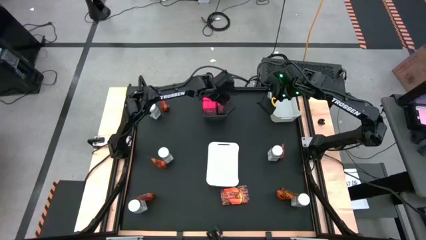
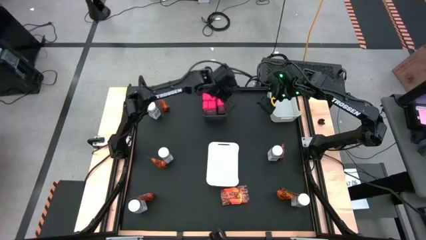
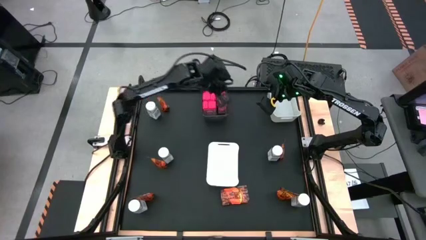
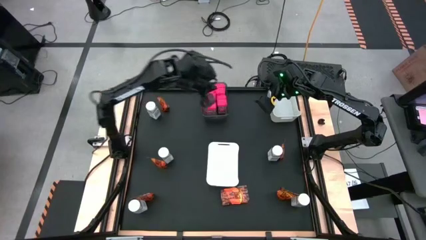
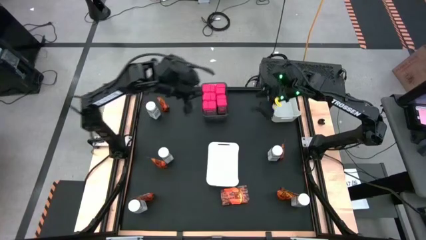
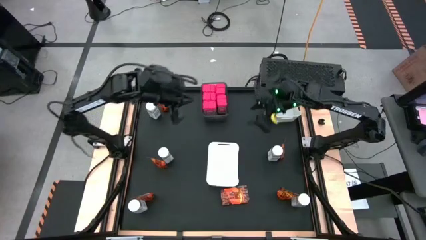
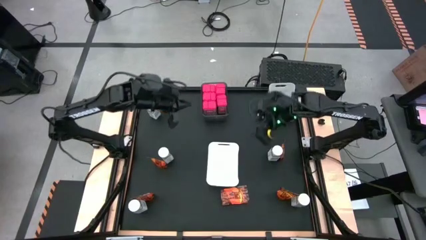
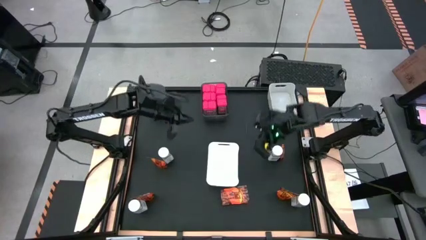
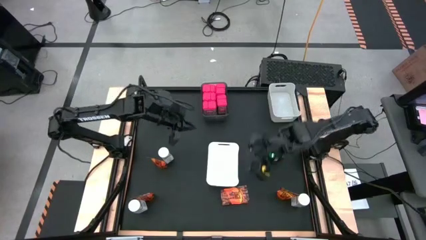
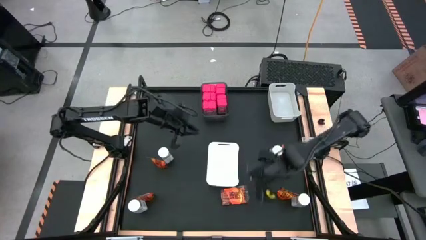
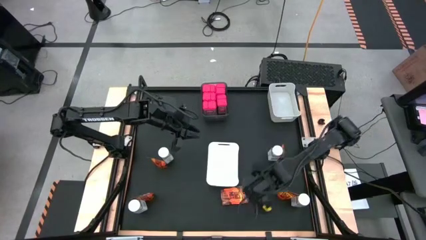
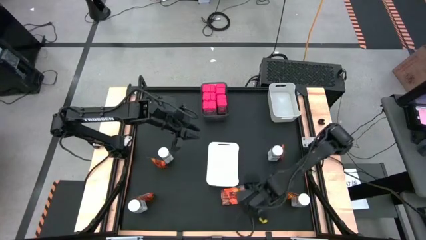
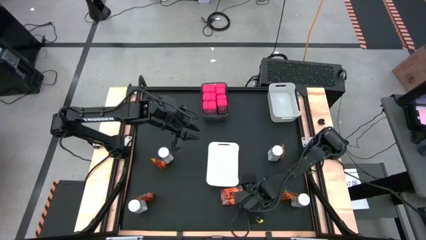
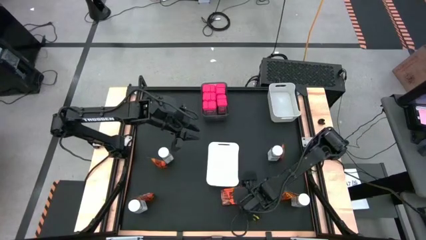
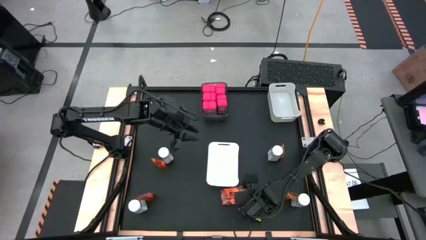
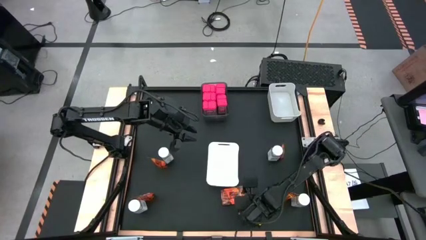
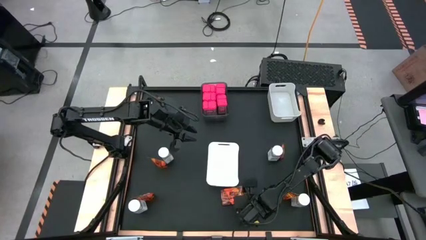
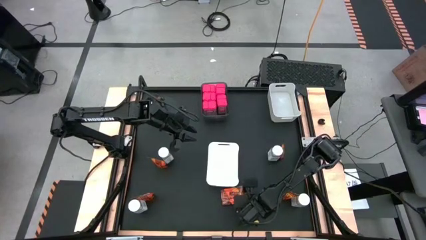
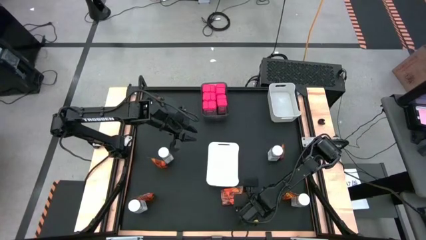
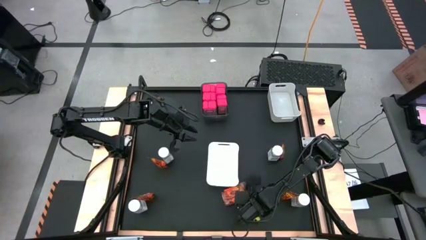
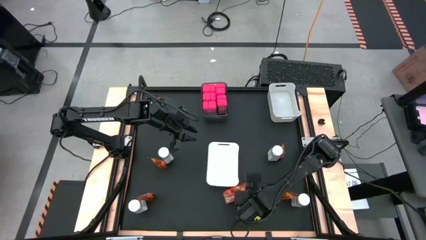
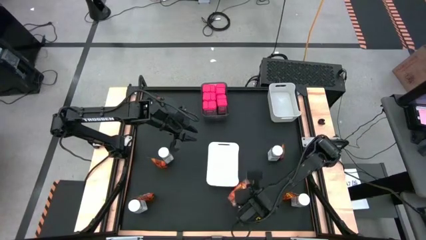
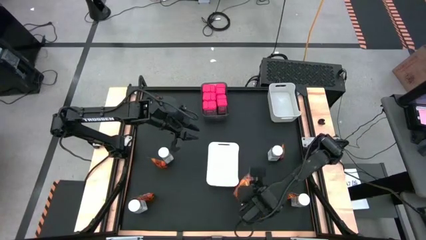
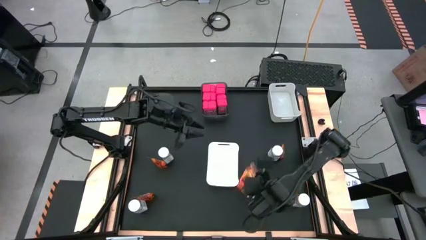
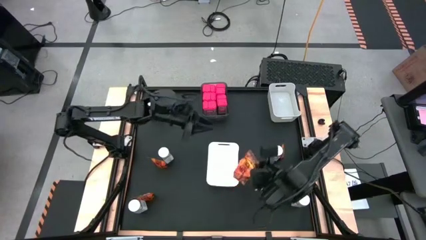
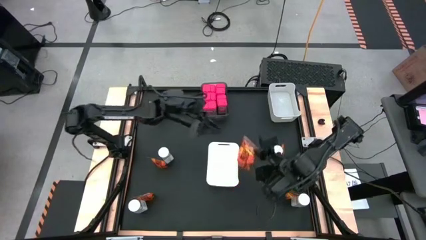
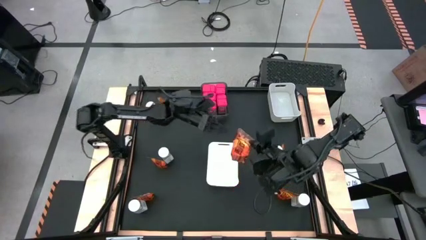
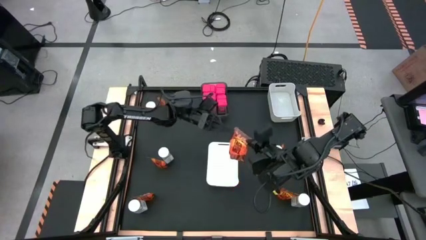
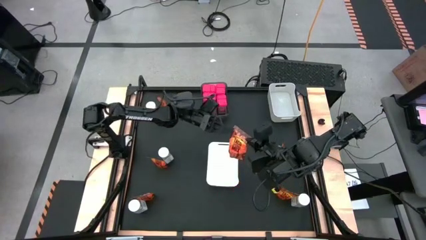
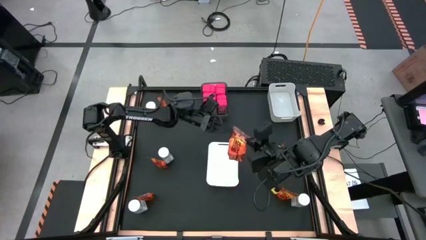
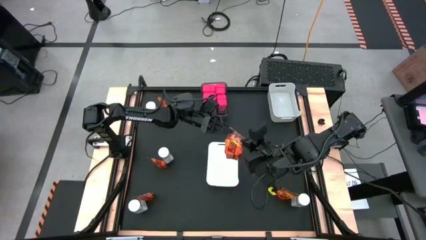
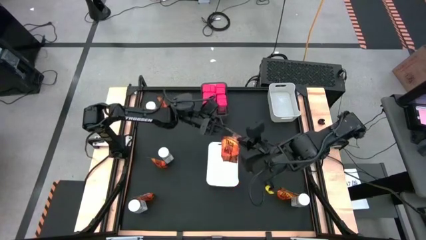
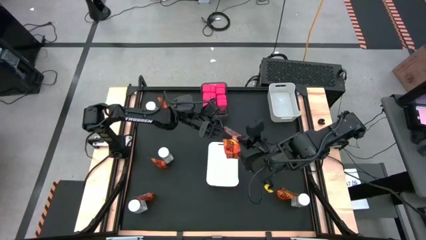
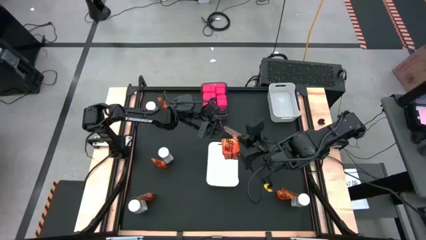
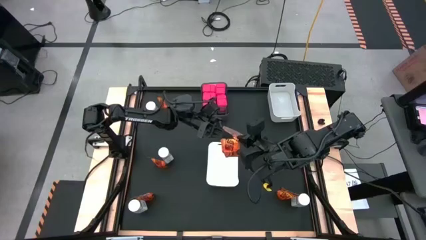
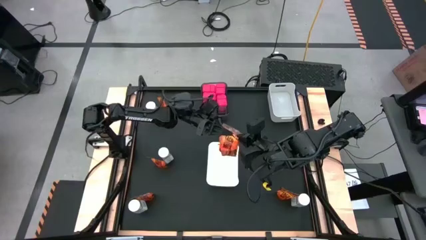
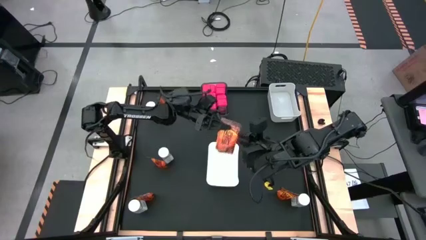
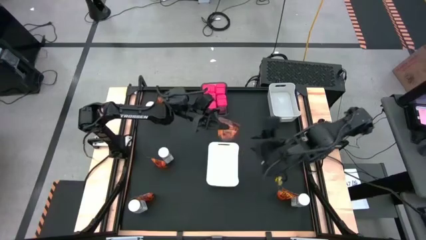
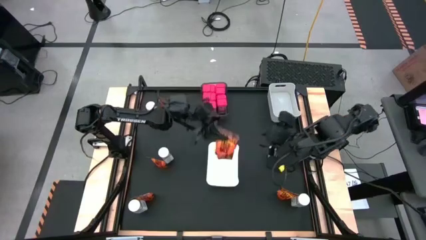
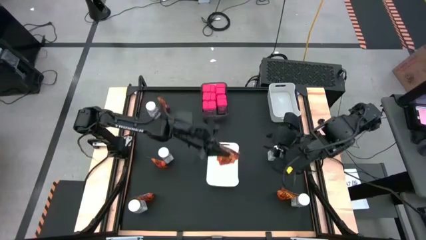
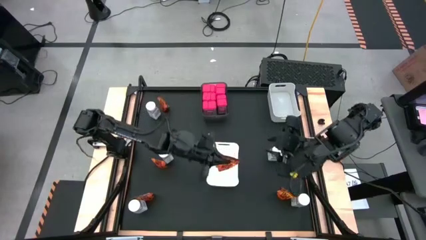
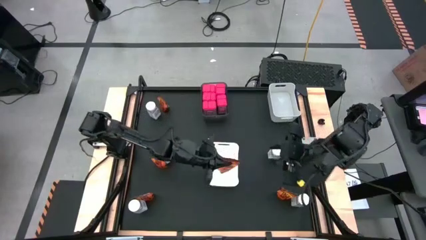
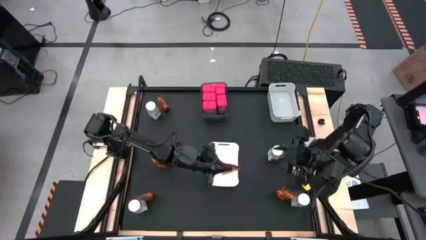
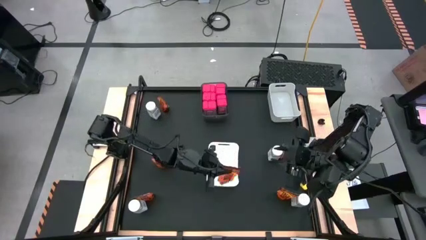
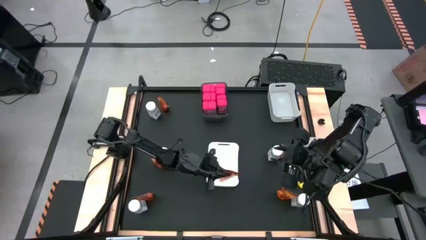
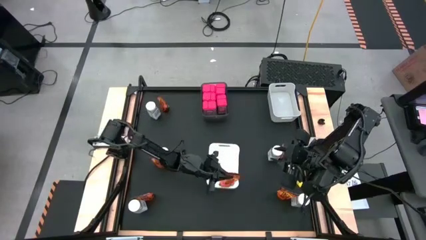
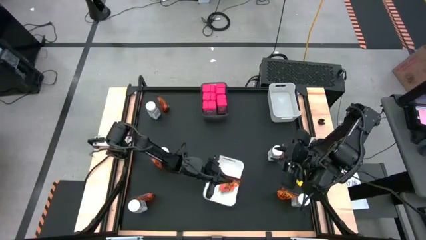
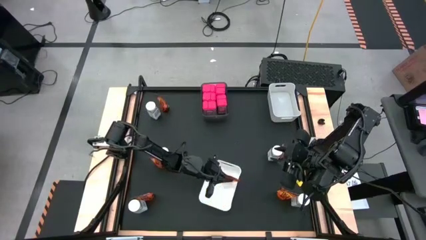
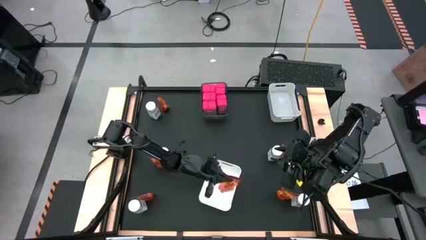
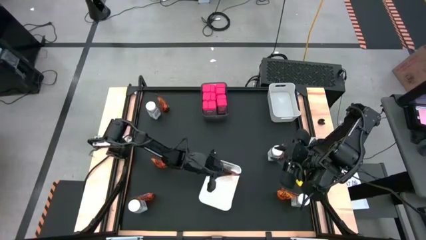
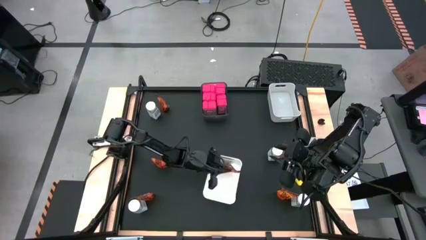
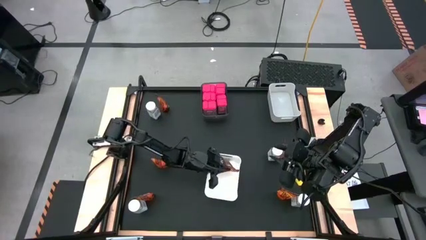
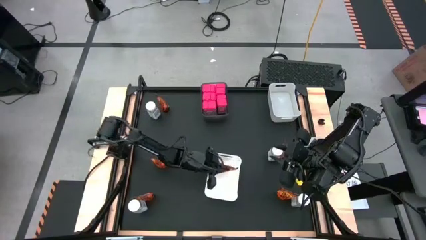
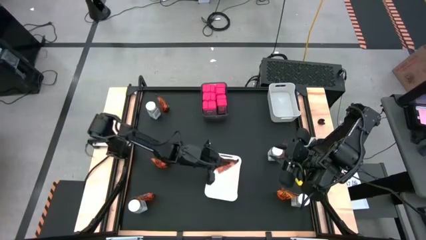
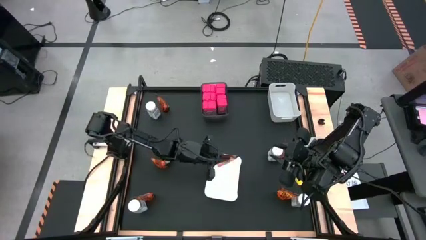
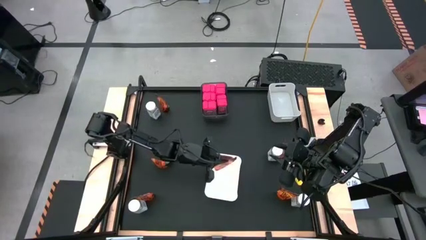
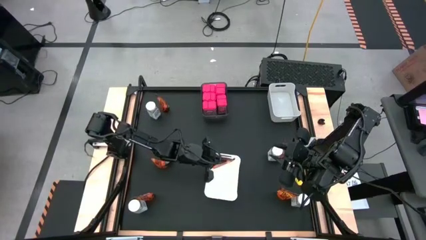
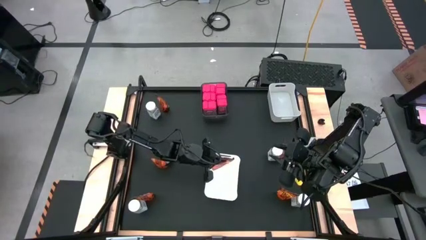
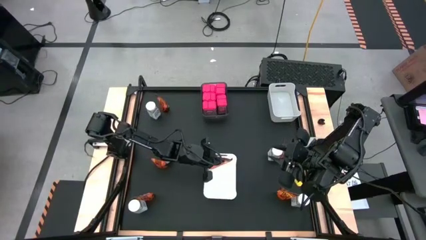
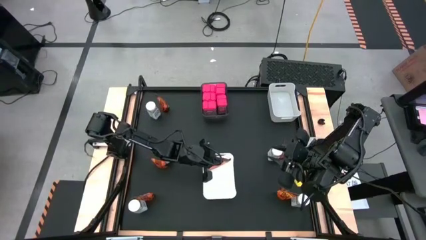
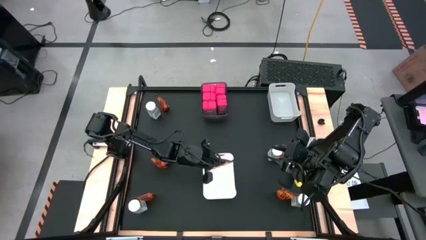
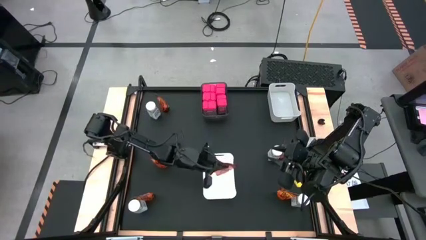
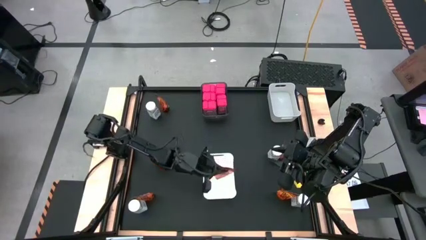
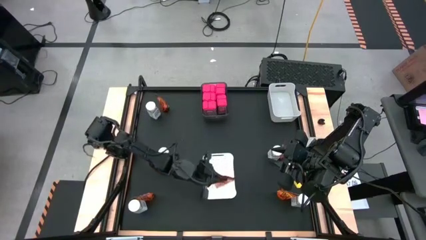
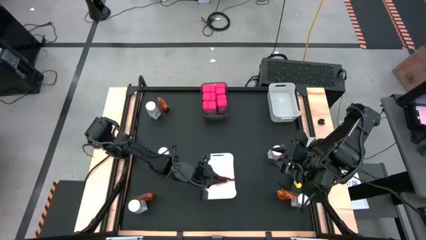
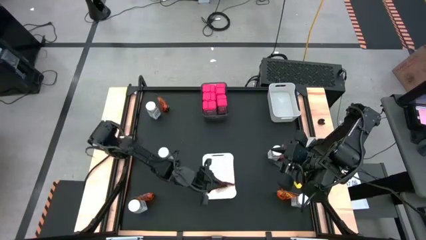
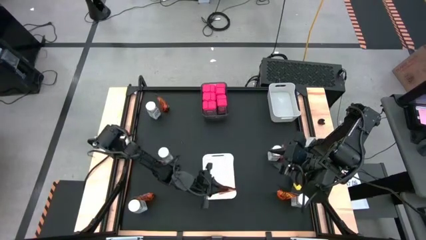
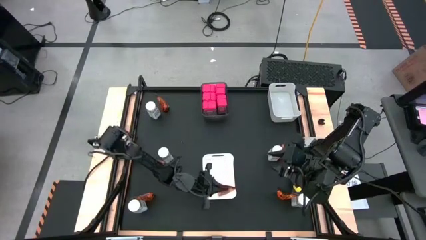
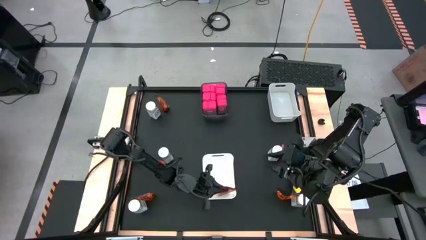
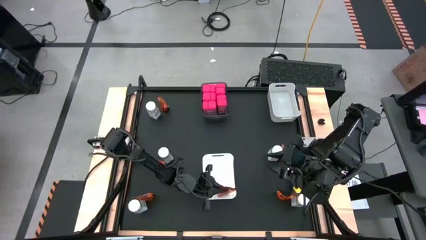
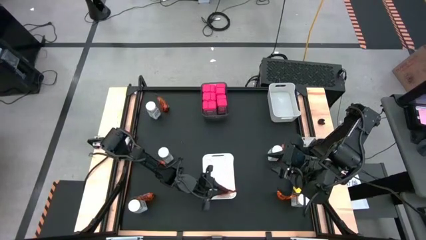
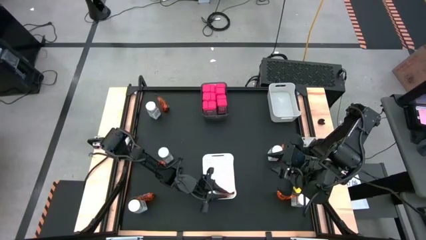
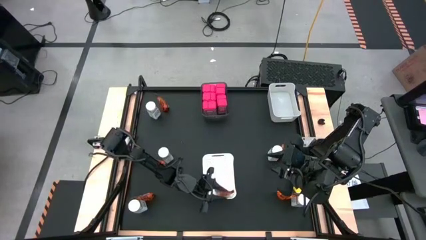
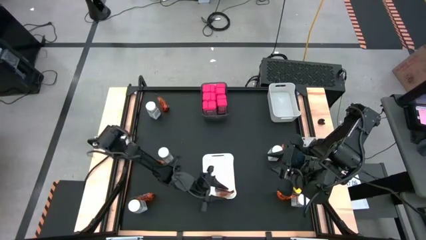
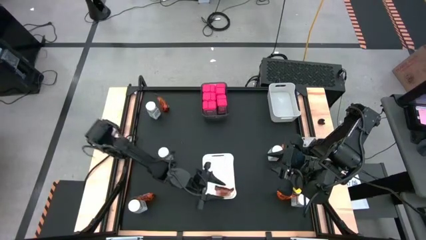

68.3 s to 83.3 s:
Task: Sort spices by type
Put the orange seasoning pack into the white bin

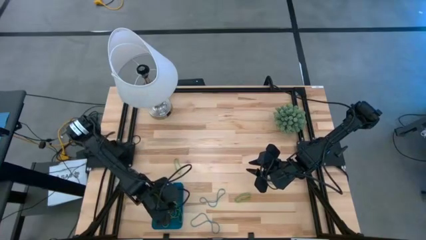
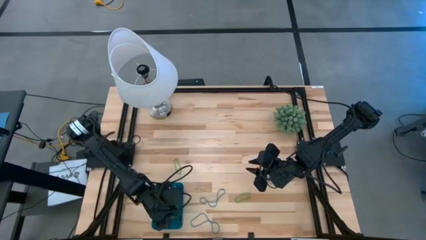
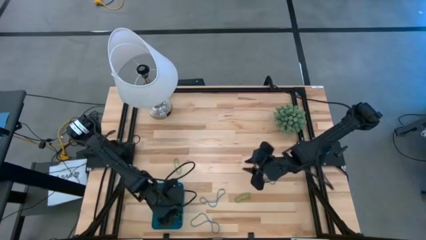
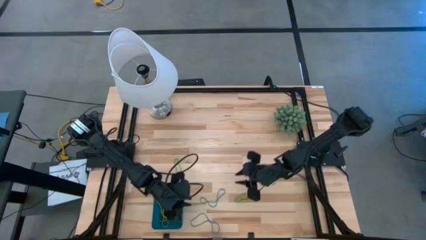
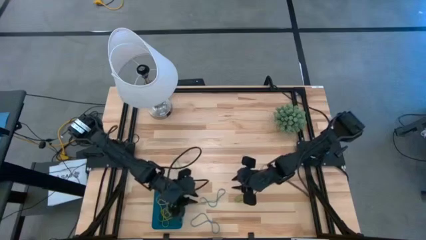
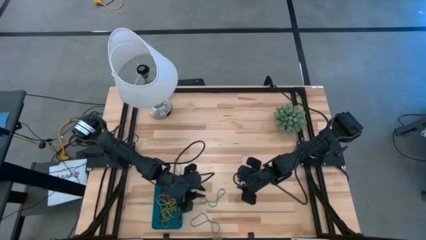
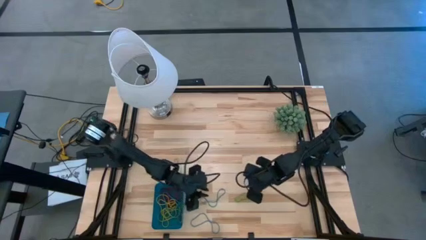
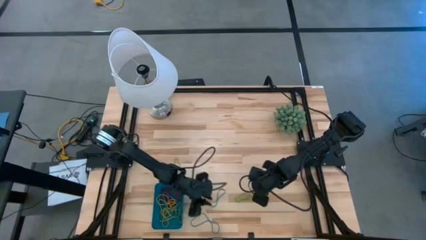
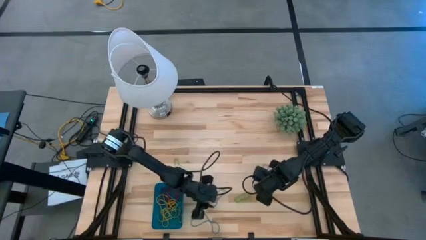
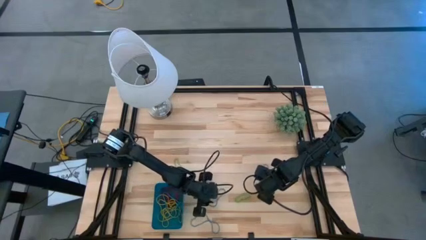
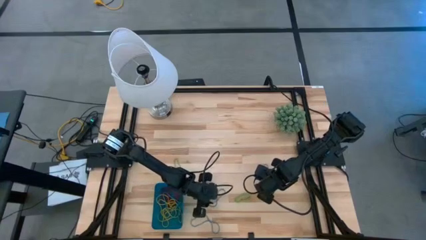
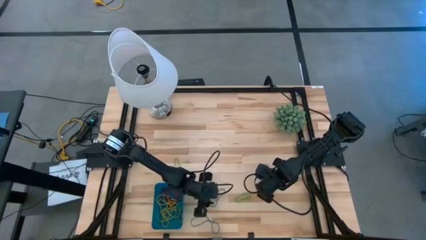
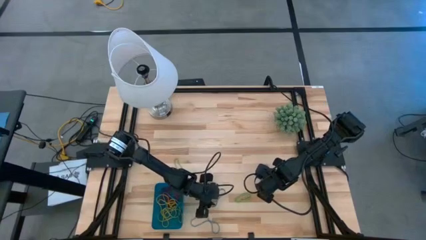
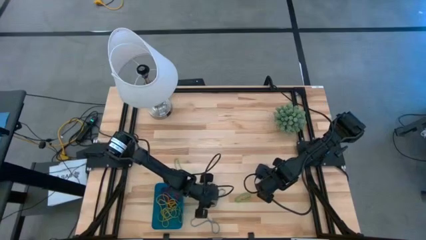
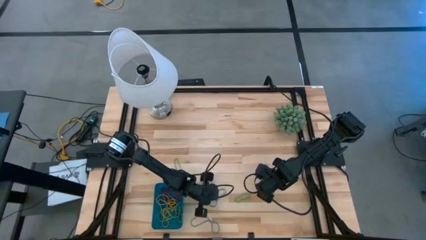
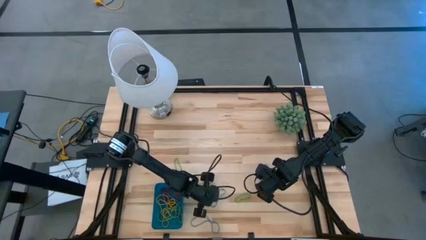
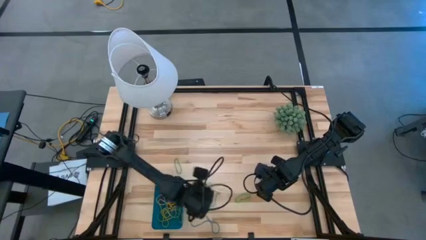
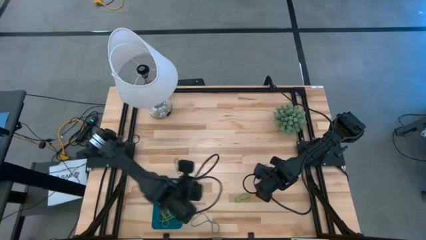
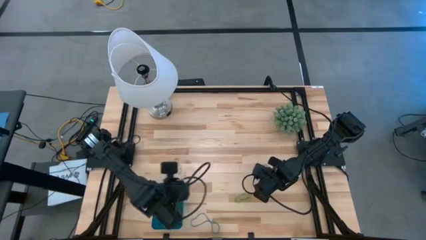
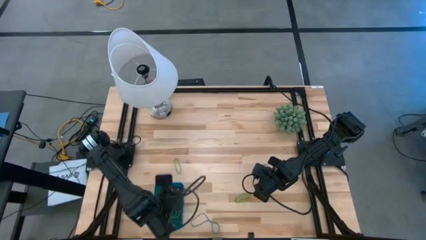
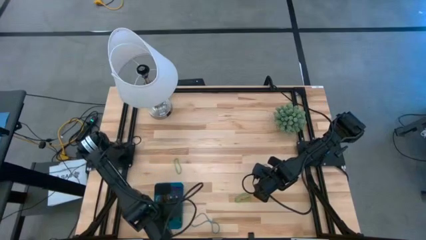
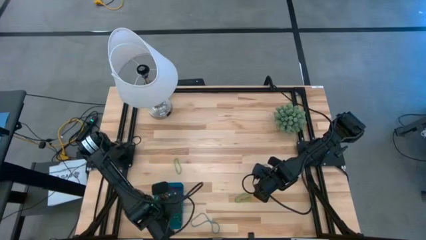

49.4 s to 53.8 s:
Task: Pick and place items into bin
Put the middle blue rubber band into the blue bin
